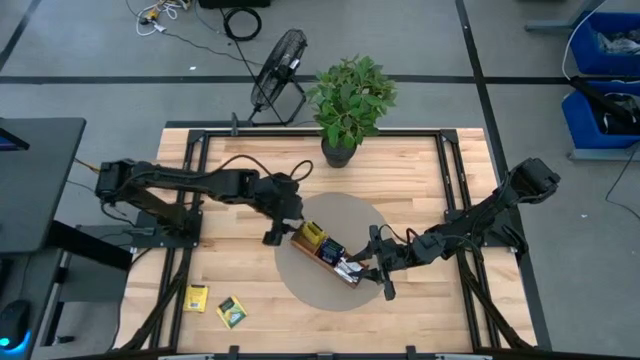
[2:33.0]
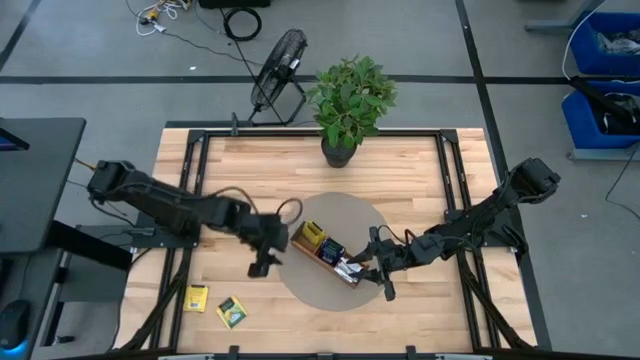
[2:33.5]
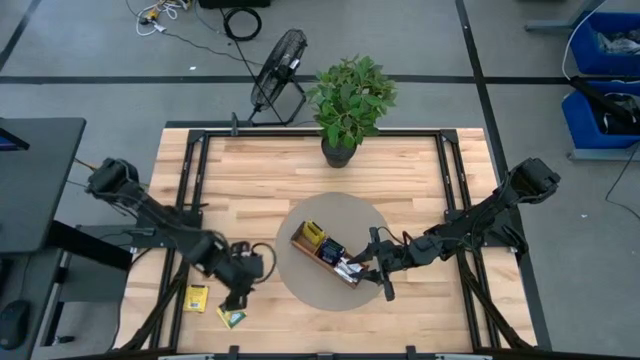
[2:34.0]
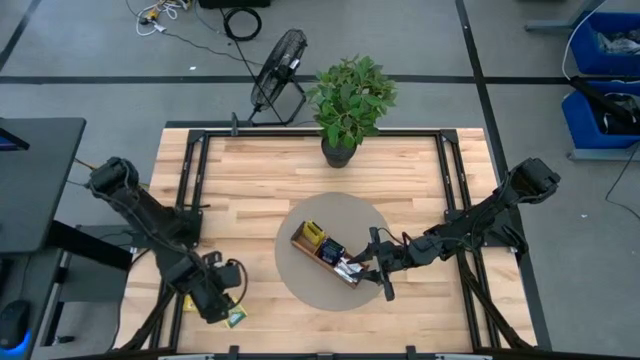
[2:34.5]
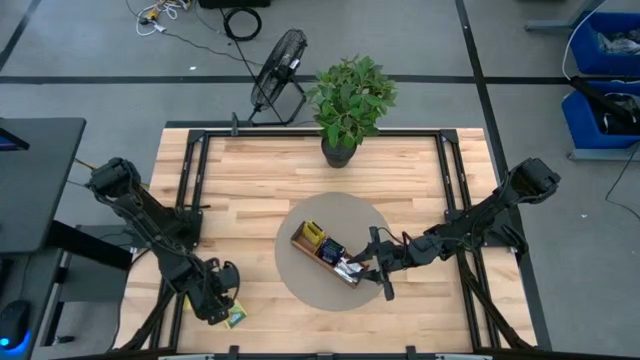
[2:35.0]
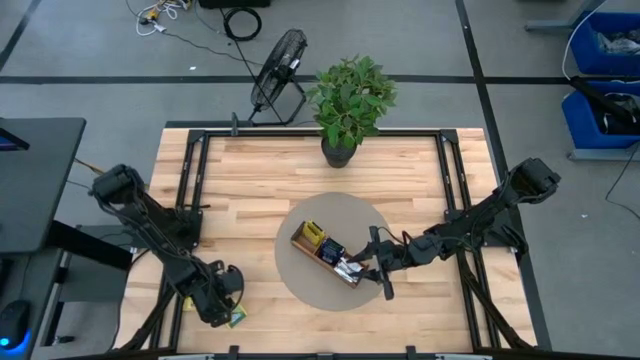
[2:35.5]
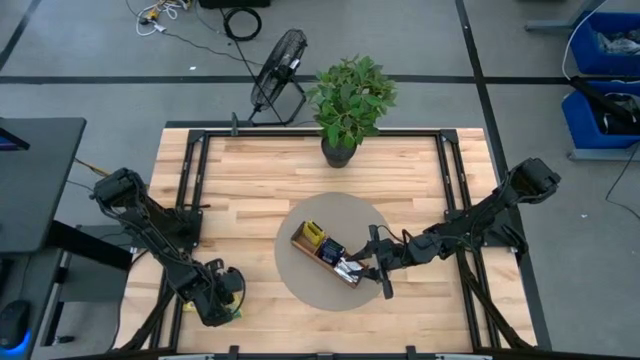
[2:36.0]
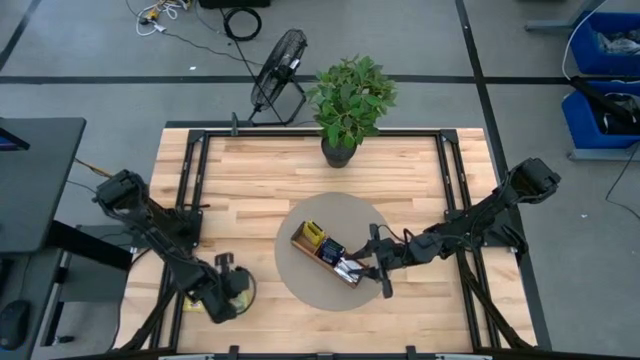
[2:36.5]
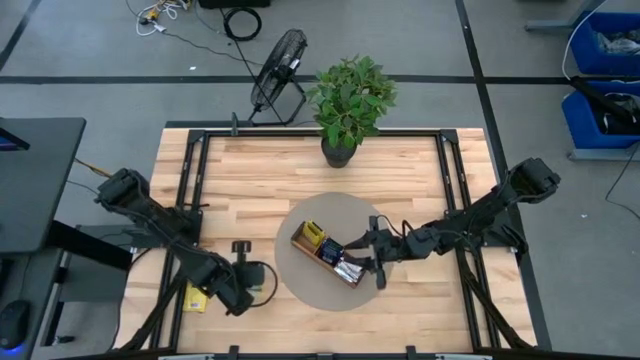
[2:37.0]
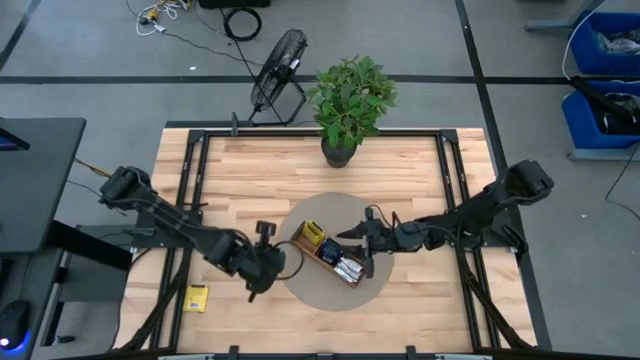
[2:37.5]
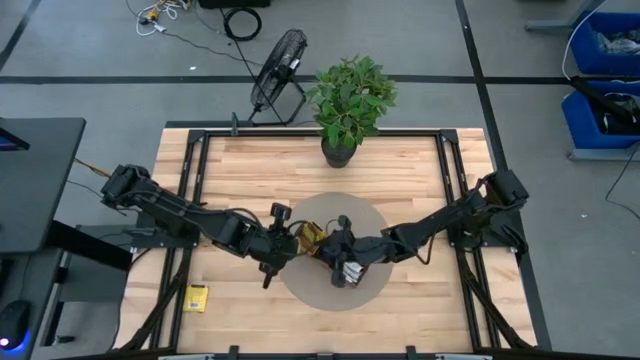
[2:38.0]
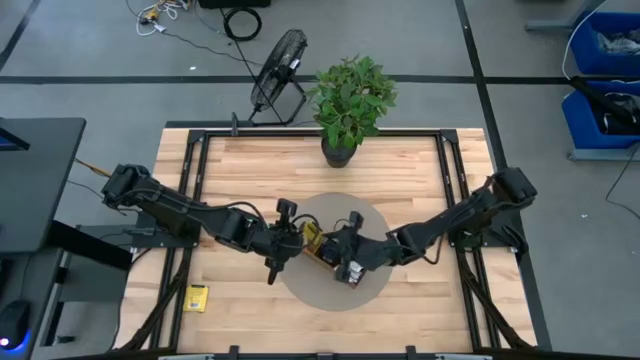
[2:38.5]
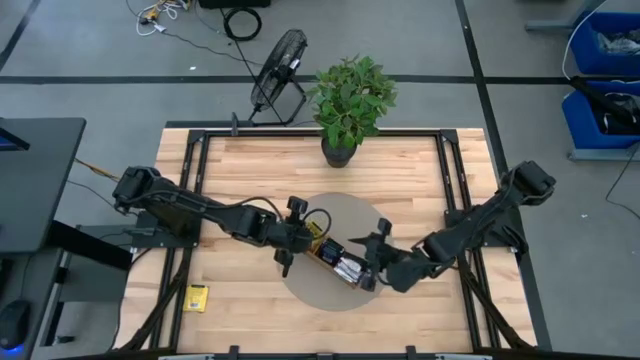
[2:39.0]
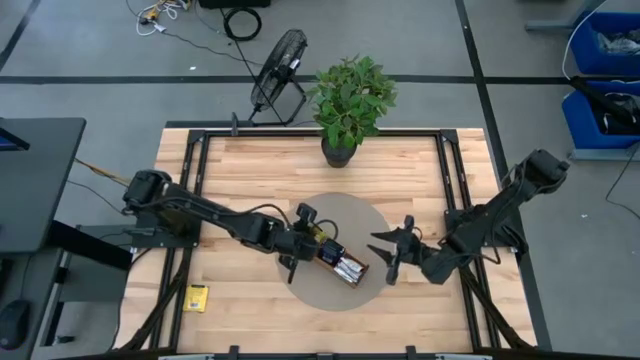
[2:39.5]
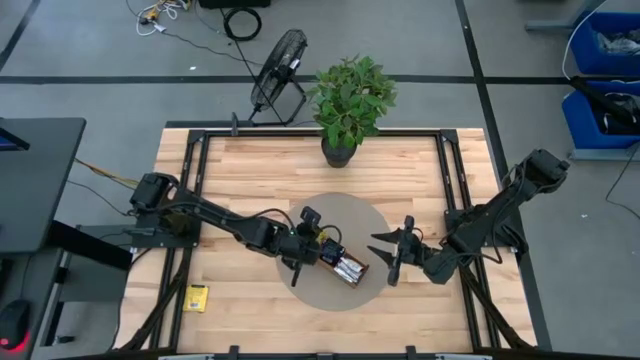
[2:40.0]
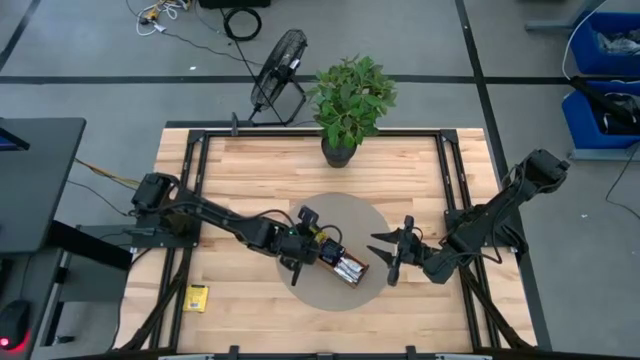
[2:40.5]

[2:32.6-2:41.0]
Task: Pick & Place Tea
Put the yellow tea bag into the top section of the wooden organizer

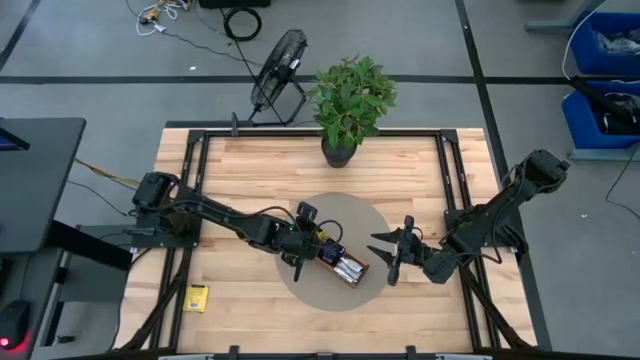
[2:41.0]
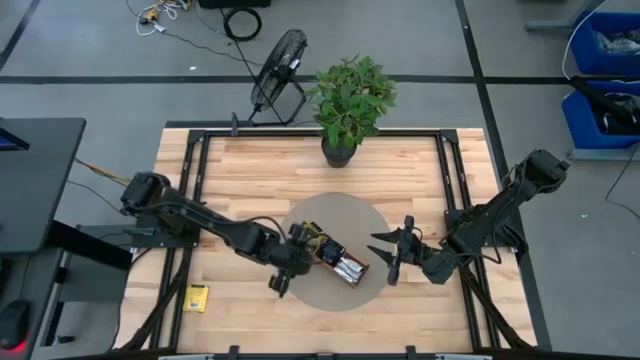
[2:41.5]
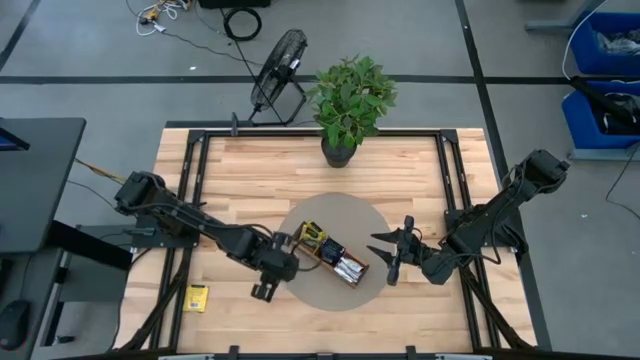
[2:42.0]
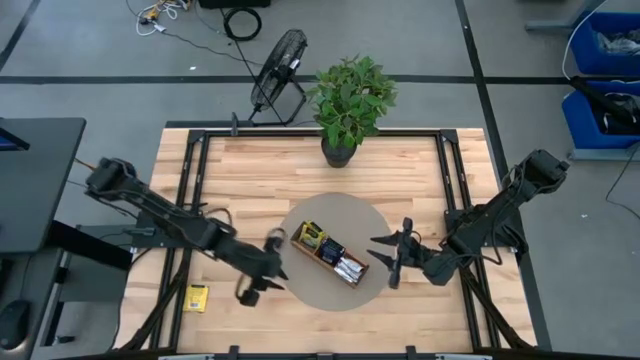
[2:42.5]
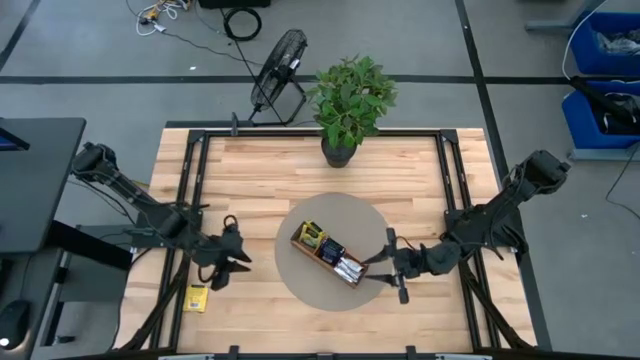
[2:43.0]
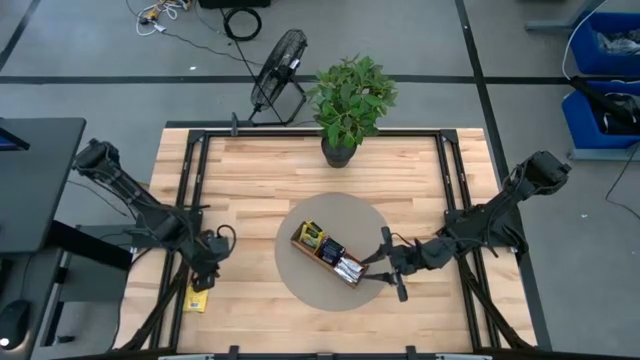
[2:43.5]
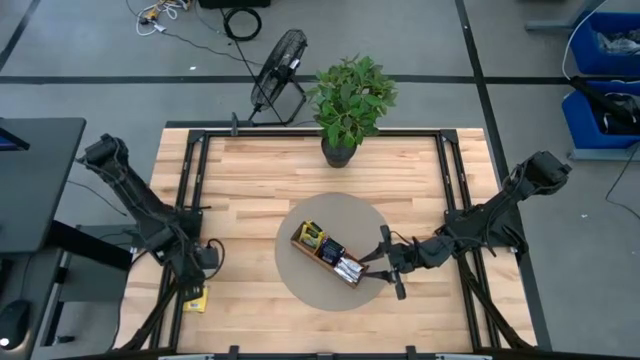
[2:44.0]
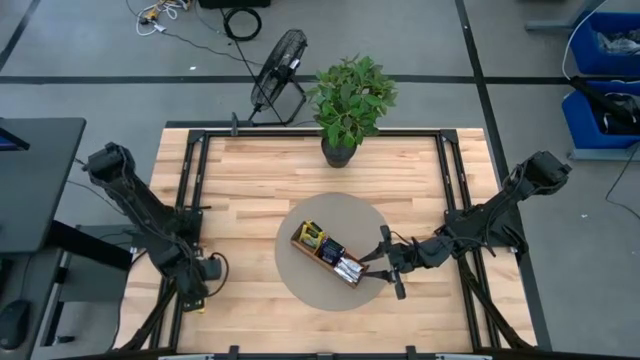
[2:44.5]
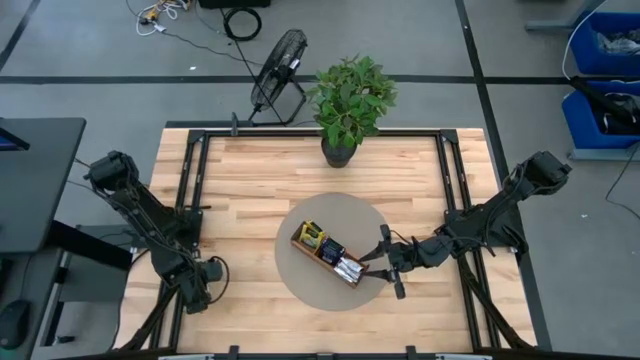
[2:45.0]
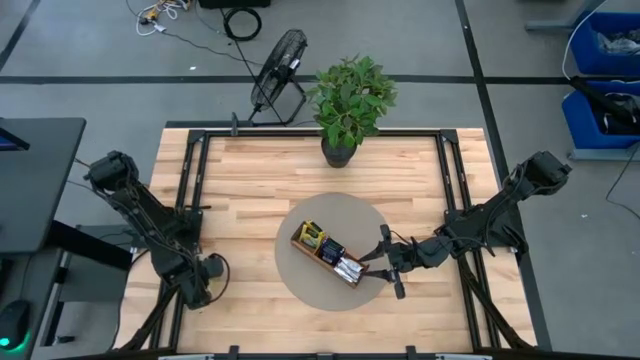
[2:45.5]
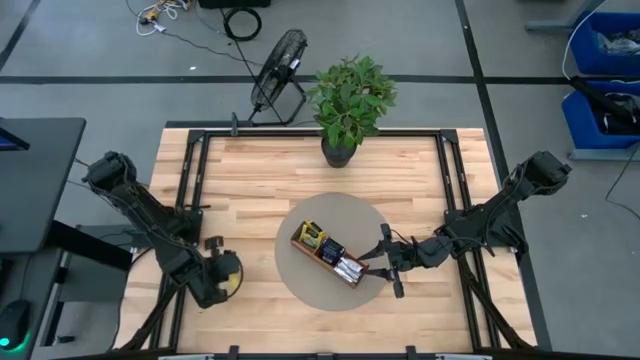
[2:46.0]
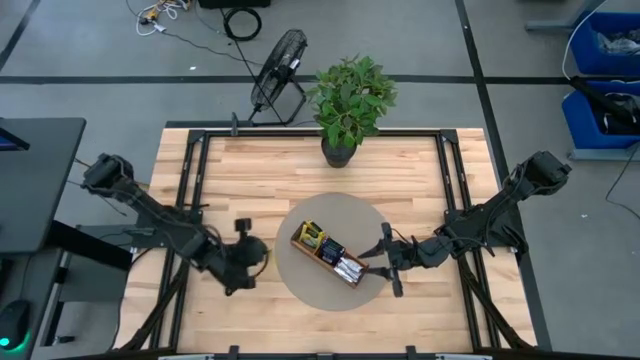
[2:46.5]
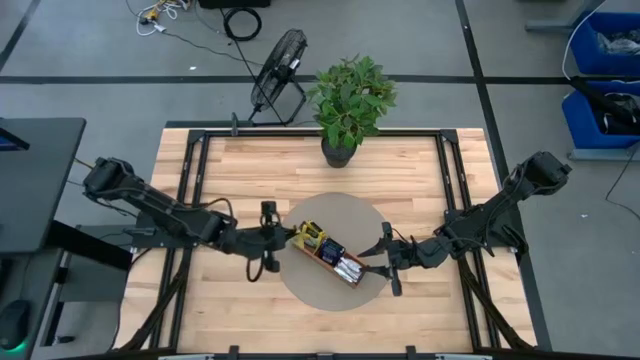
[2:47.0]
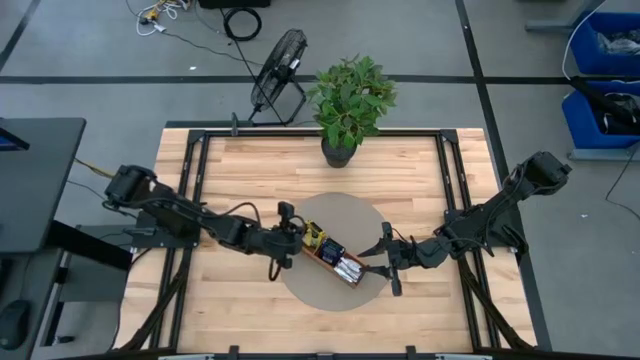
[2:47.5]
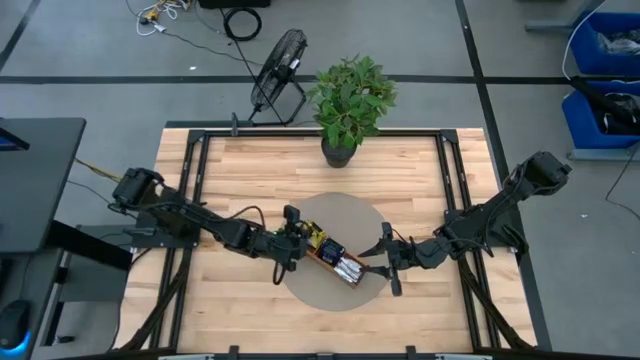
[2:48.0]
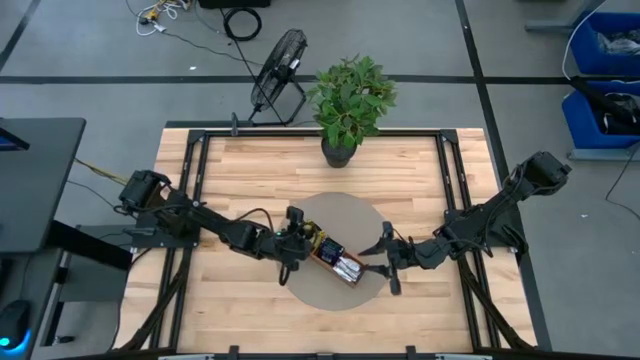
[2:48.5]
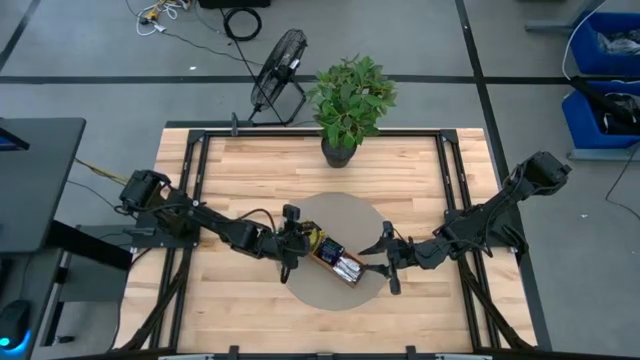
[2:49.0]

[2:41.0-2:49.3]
Put the yellow tea bag into the top section of the wooden organizer

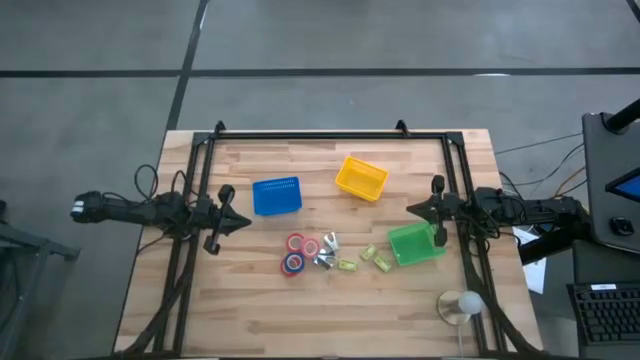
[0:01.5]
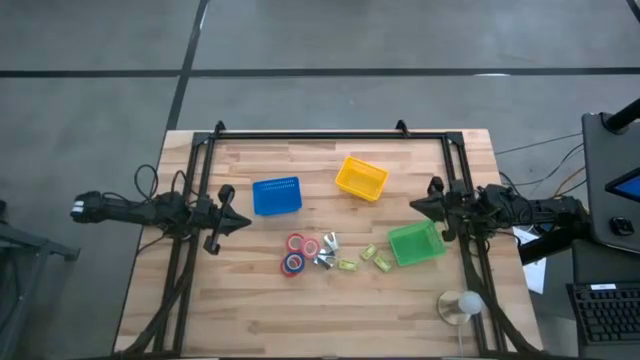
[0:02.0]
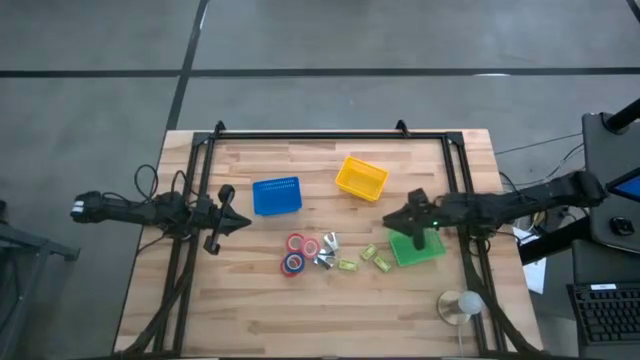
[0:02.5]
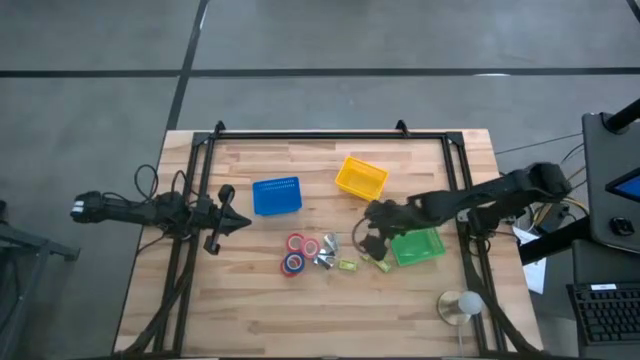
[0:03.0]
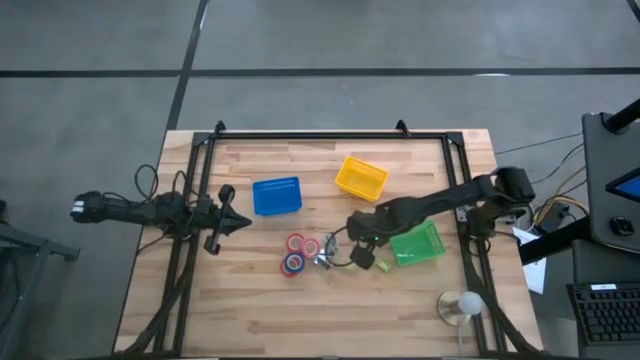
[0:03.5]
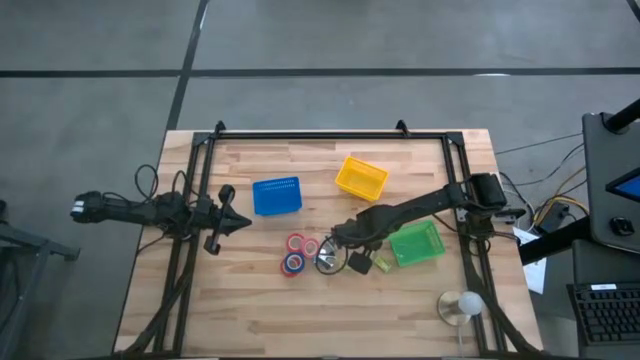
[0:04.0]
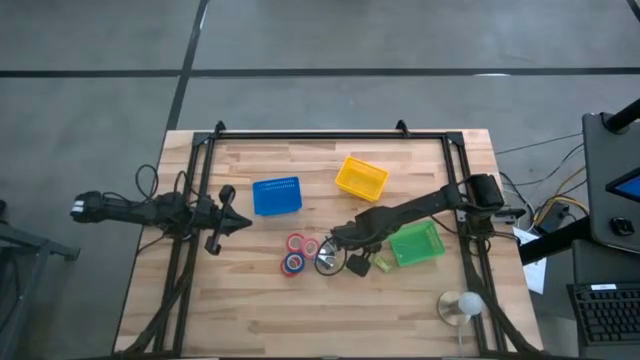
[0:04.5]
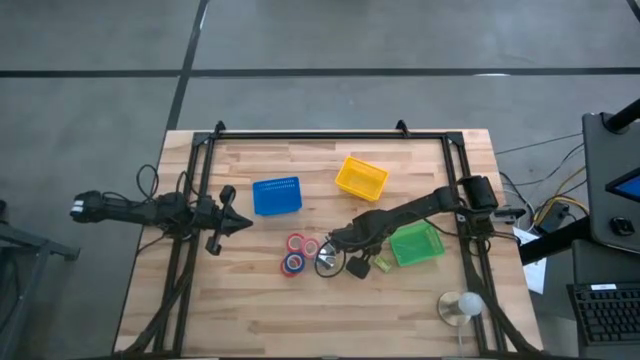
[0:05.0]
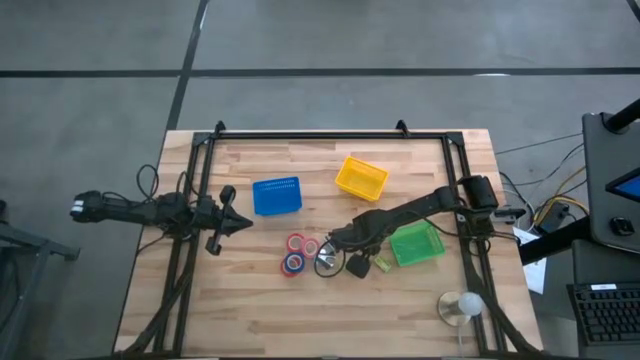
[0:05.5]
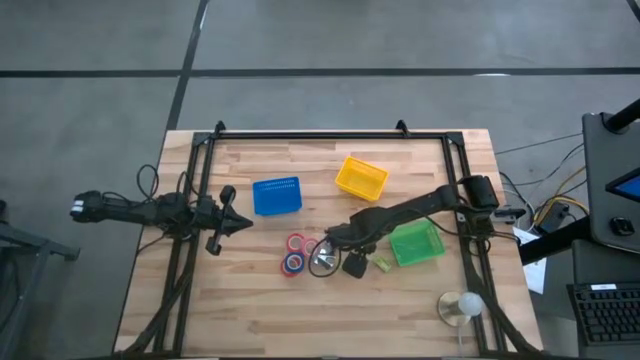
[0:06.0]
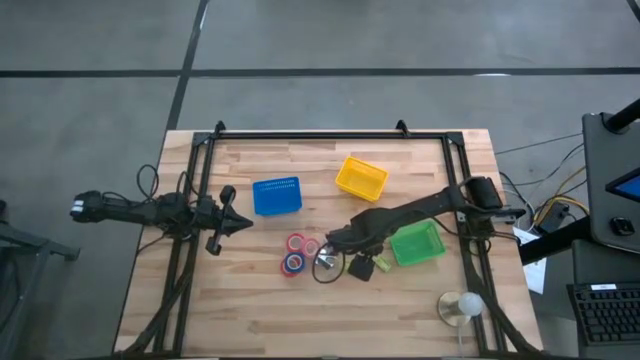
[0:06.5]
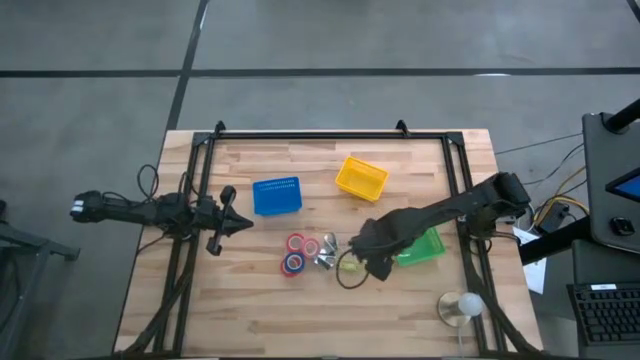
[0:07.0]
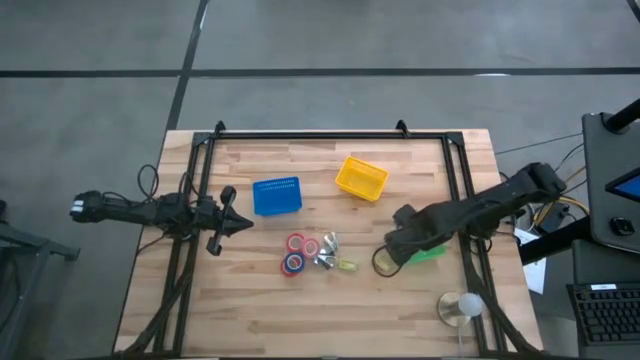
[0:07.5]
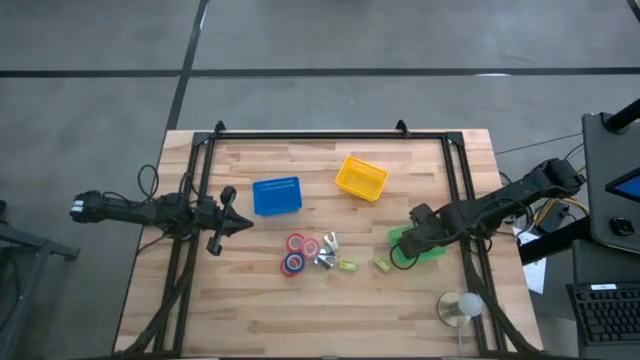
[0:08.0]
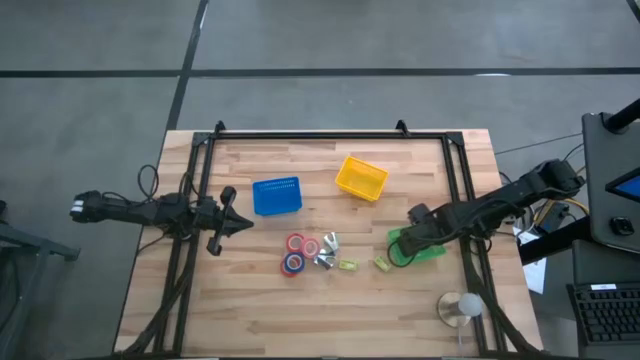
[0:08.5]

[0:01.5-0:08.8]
Task: Pick and place Stapler, Stapler remover, tape
Put the top green staple box into the green bin
